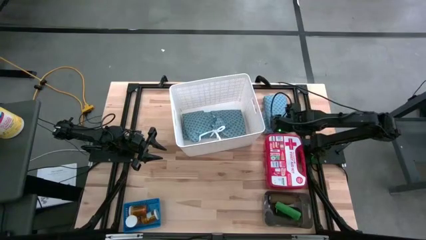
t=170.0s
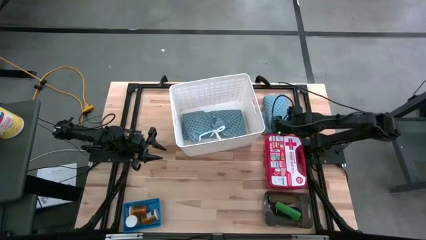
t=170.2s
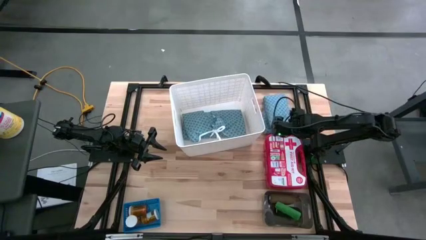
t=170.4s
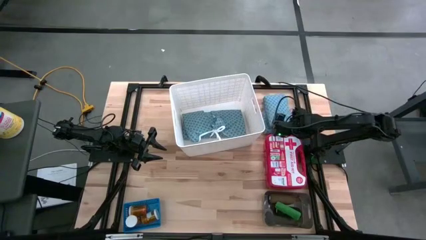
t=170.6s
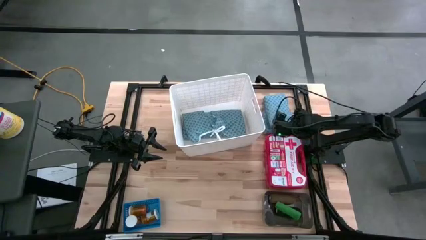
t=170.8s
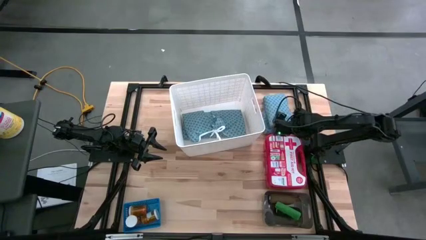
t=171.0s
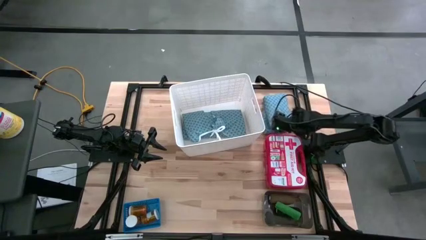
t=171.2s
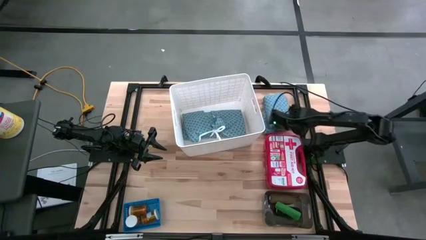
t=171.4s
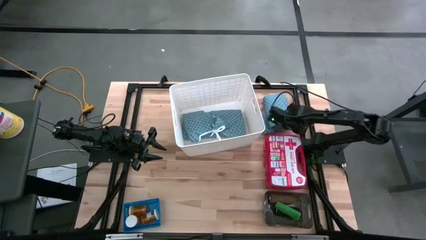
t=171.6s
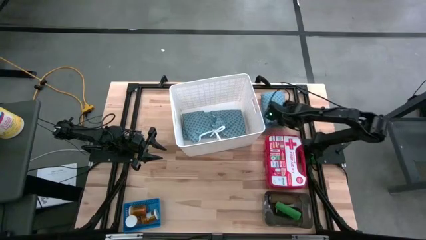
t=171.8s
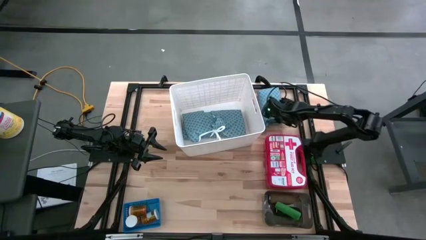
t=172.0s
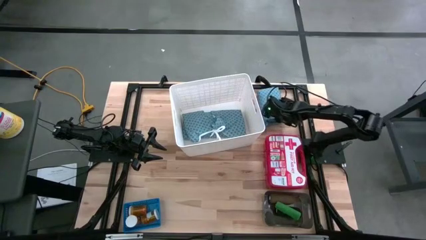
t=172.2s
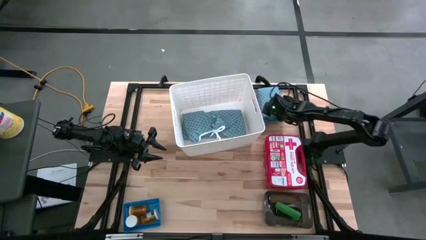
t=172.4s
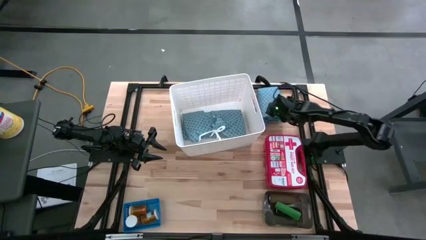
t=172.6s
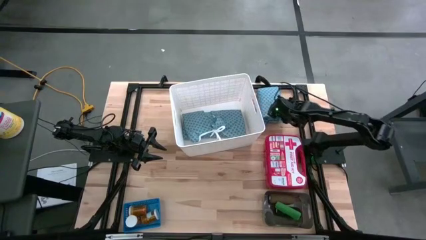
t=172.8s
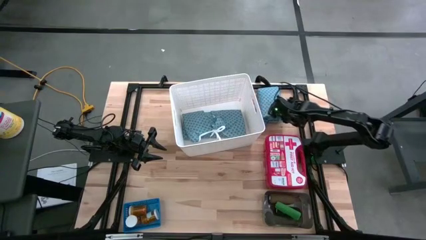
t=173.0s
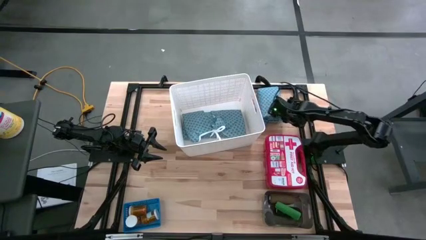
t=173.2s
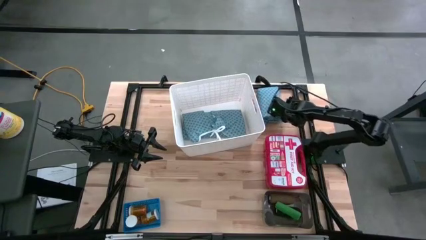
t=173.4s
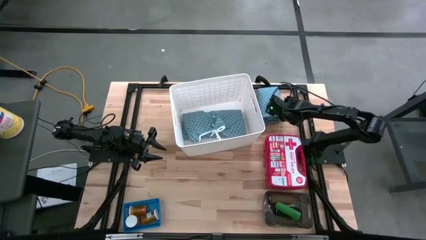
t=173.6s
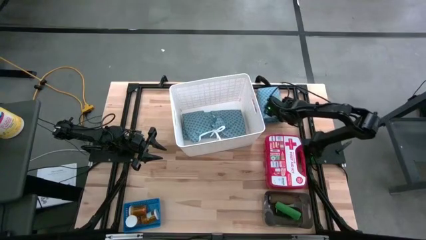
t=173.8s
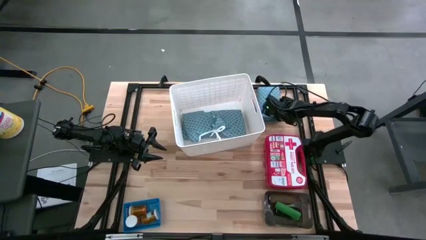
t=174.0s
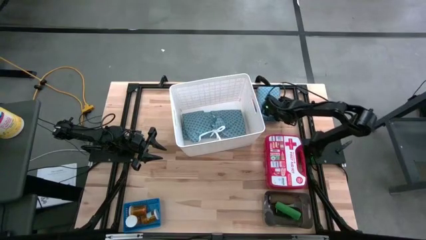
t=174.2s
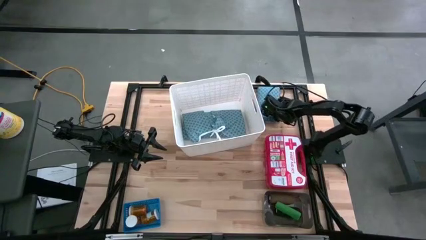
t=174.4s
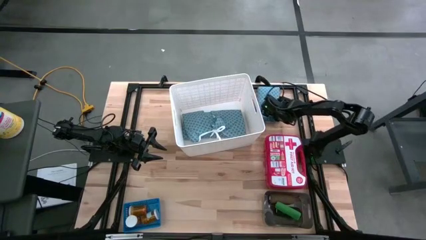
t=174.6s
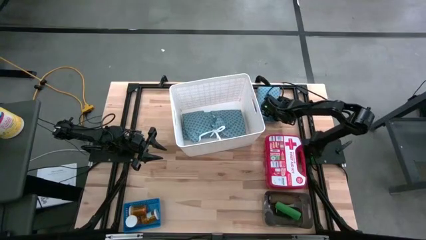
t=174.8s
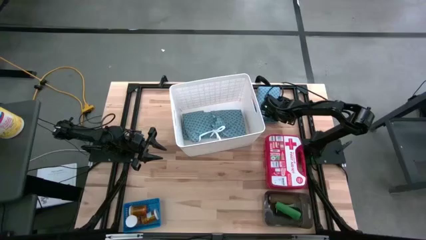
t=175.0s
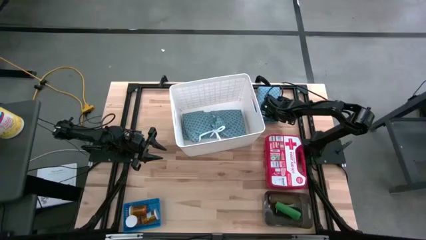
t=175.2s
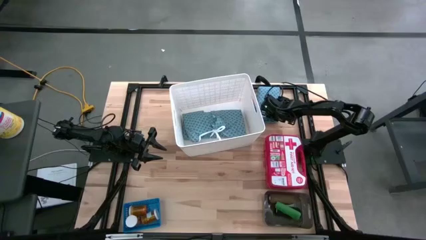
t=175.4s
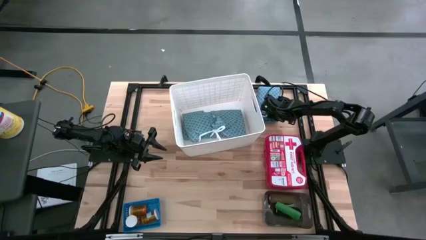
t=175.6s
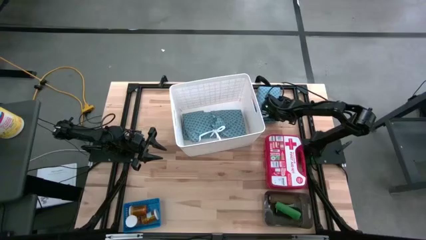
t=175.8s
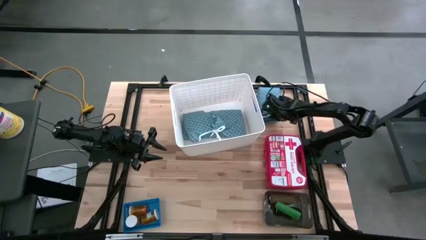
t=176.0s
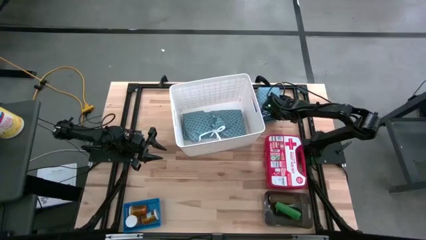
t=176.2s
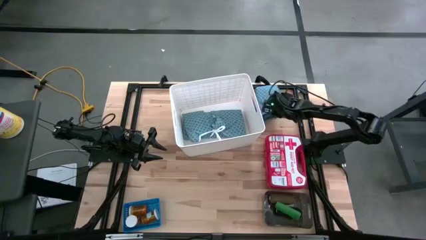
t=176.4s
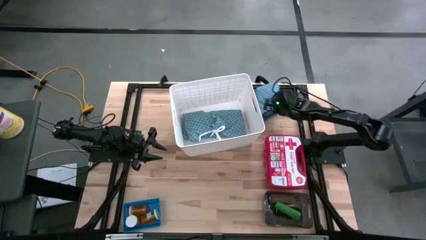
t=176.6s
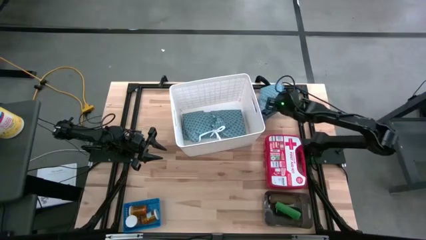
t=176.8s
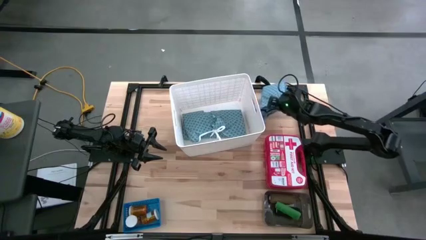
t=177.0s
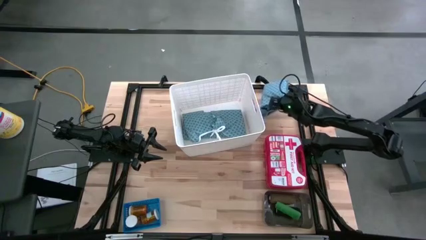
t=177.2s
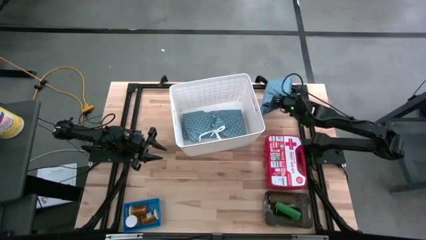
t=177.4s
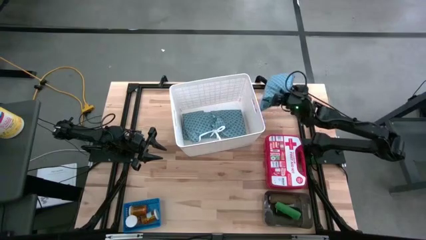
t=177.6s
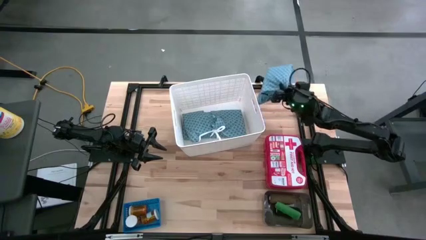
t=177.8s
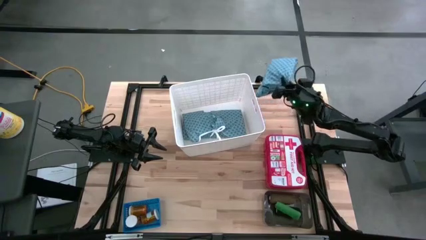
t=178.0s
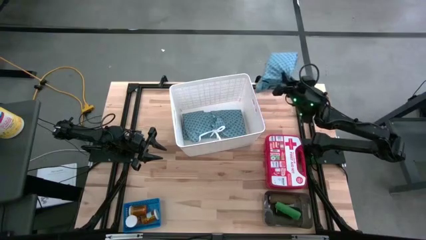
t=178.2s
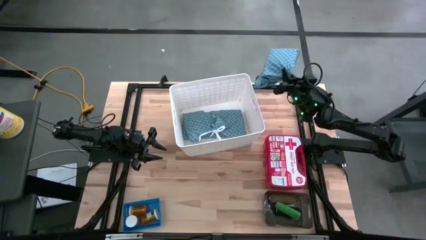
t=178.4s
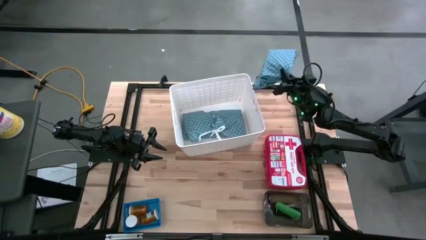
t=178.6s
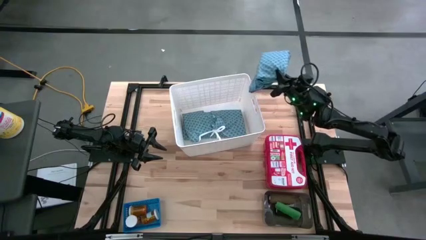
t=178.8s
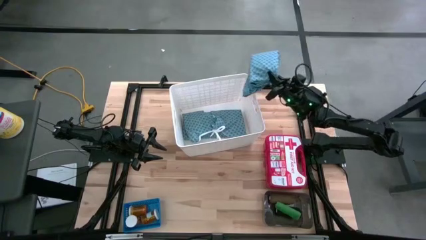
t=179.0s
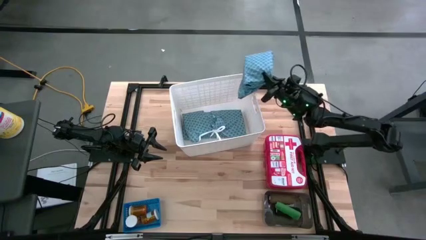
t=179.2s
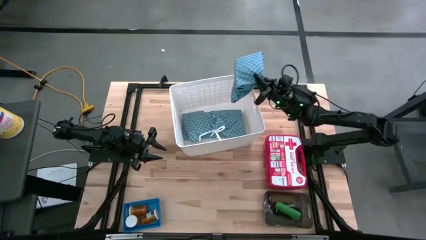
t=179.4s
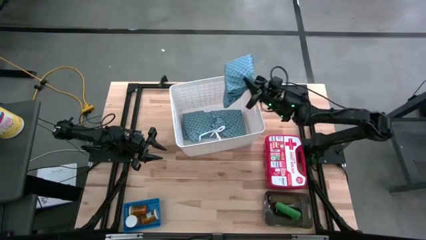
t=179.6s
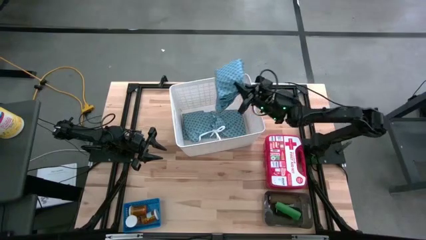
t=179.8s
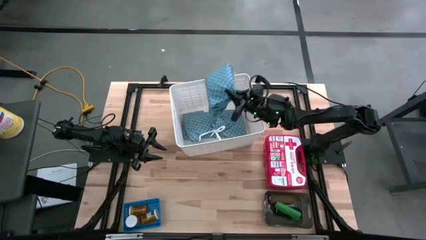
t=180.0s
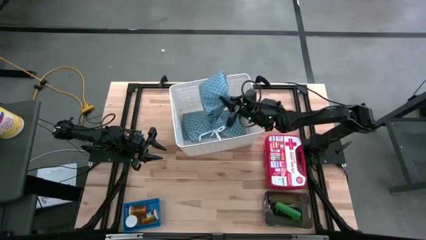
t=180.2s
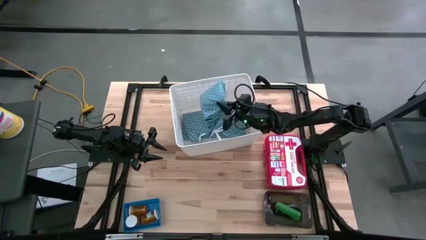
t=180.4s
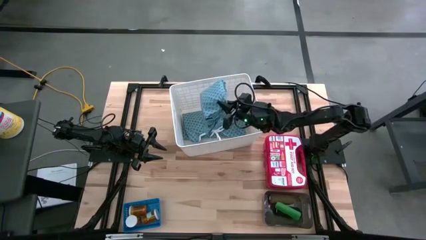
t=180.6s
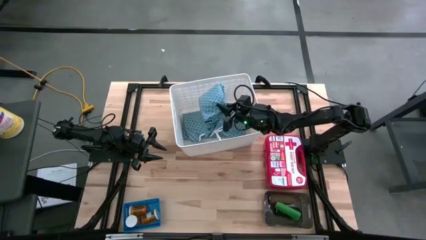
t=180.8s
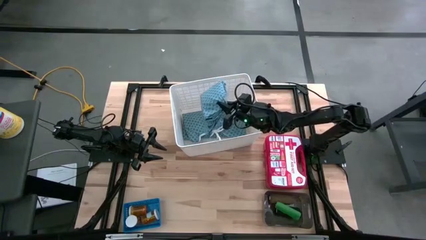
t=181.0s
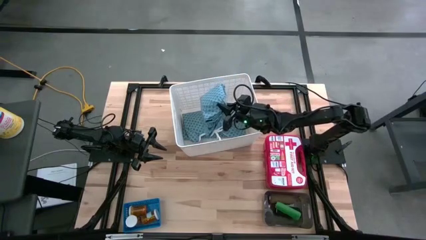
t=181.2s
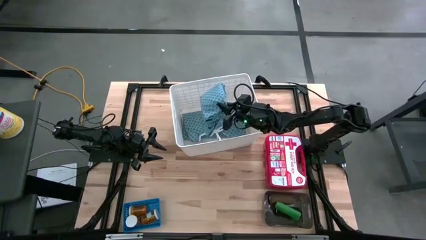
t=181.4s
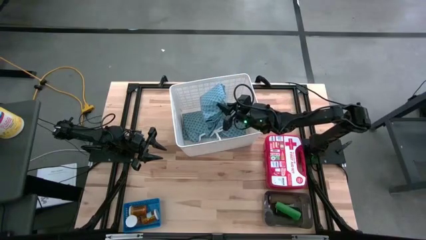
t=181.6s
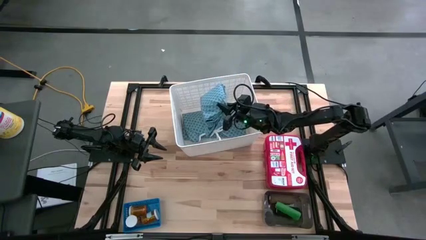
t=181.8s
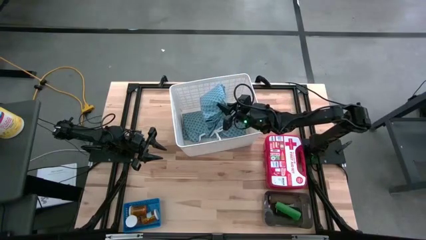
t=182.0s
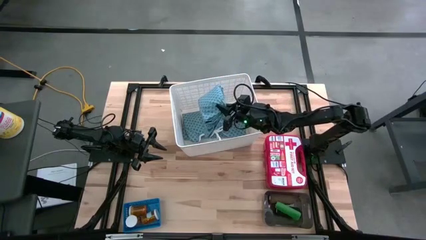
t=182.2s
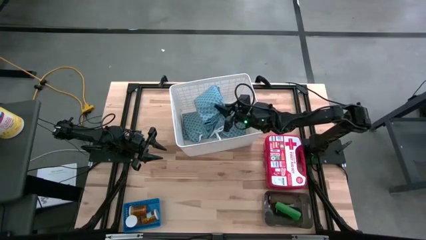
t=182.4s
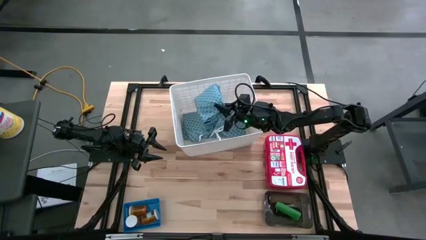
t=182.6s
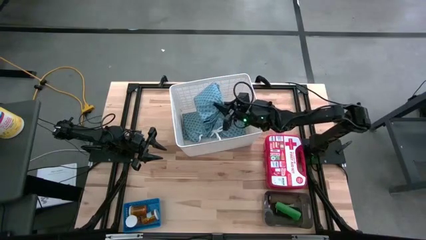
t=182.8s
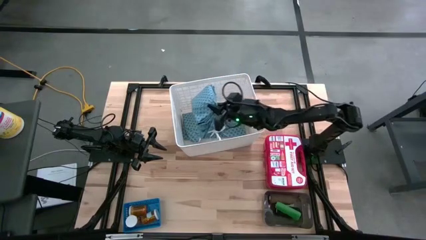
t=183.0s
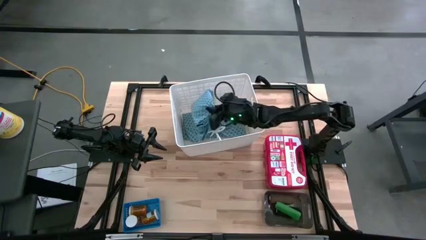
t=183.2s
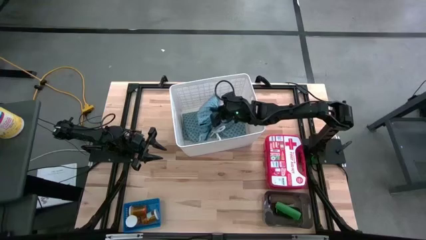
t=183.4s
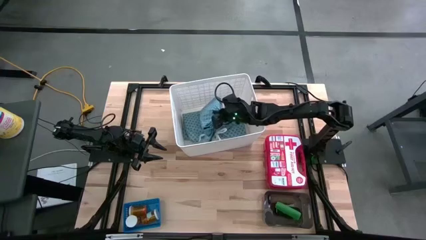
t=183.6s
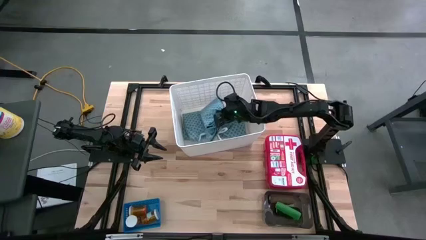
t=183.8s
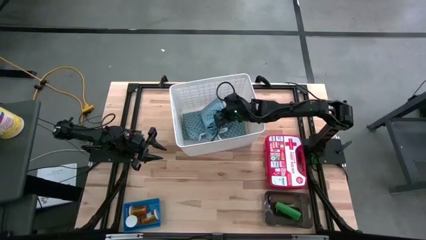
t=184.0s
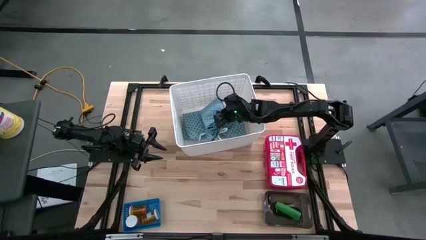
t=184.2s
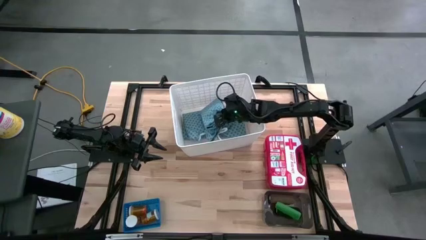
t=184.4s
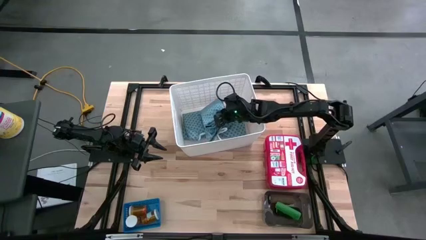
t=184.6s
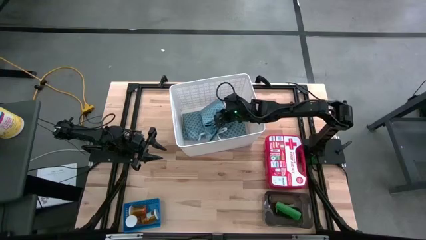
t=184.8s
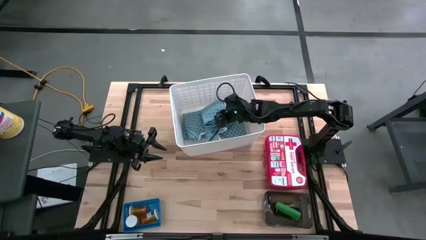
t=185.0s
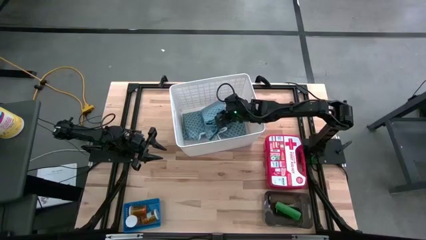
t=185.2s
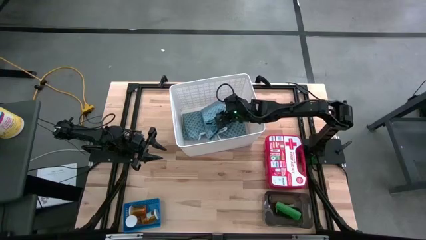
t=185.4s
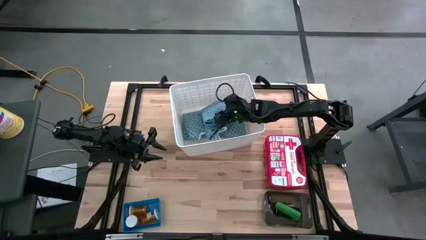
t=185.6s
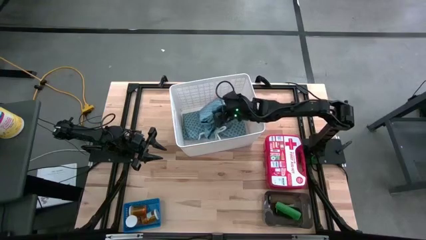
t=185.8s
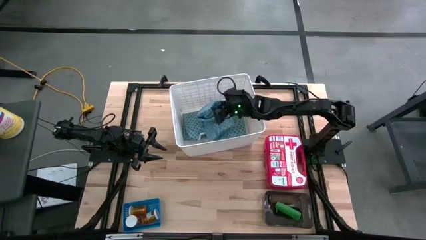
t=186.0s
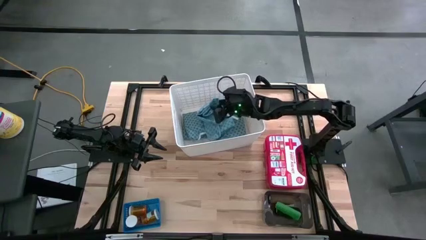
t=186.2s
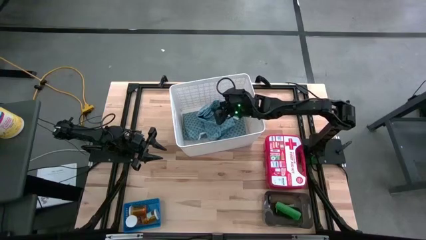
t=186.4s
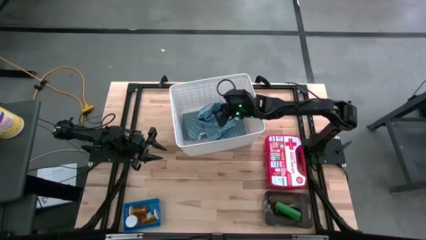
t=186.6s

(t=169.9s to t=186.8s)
Task: Pick & place medical supplies in basket/bin
Put the patient gown into the white bin
